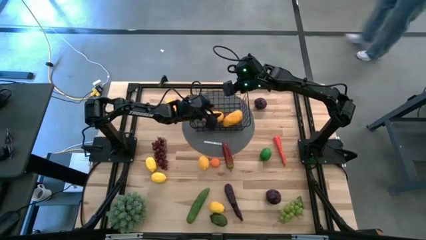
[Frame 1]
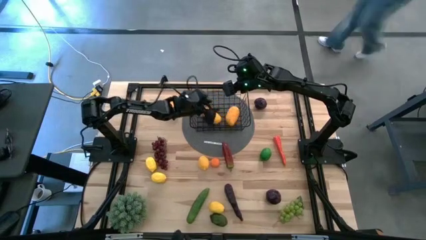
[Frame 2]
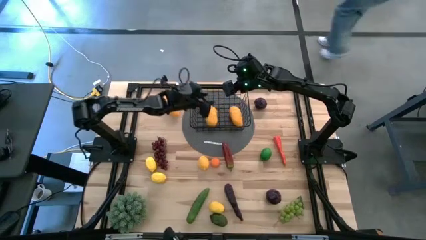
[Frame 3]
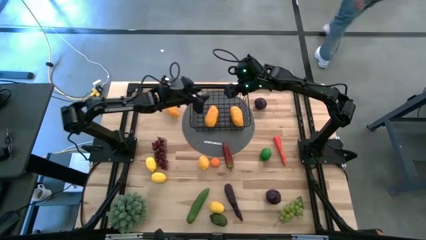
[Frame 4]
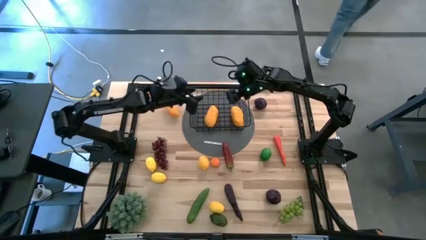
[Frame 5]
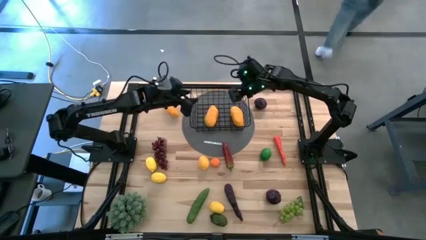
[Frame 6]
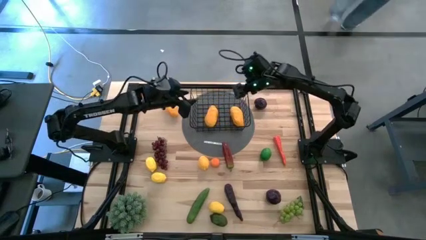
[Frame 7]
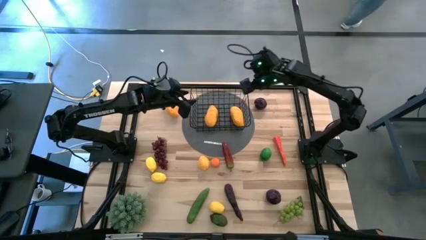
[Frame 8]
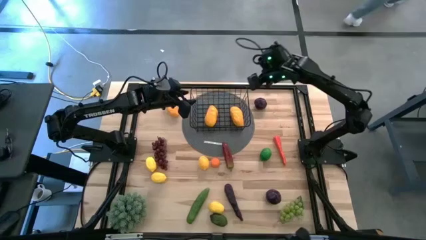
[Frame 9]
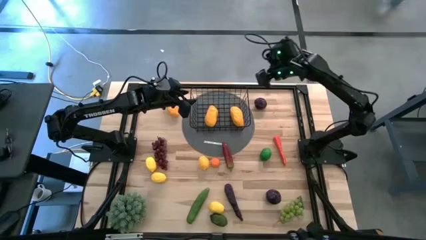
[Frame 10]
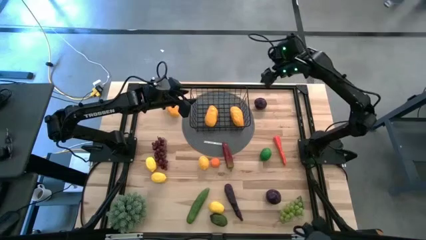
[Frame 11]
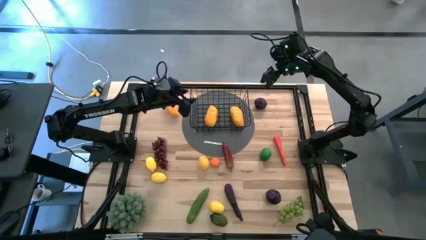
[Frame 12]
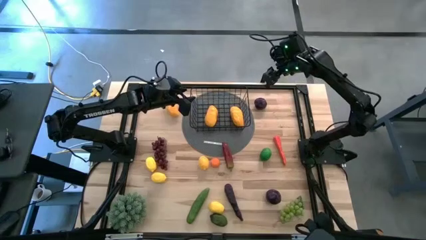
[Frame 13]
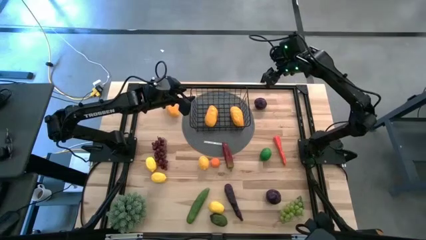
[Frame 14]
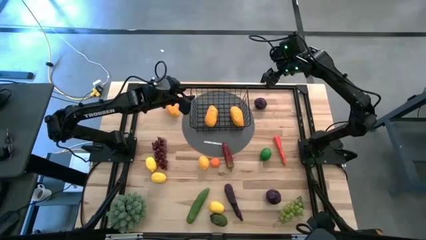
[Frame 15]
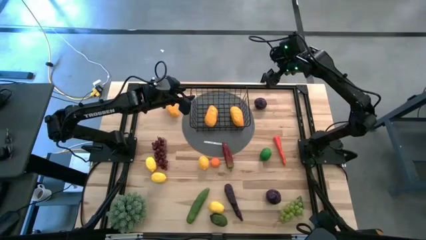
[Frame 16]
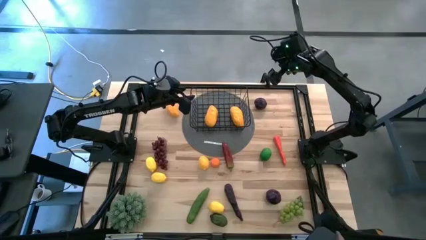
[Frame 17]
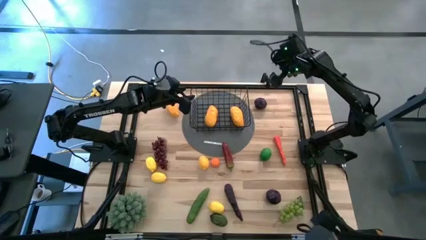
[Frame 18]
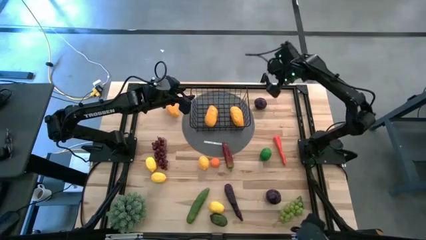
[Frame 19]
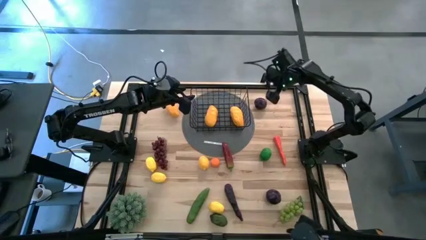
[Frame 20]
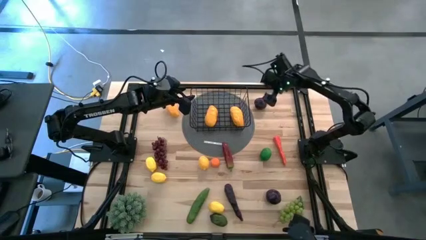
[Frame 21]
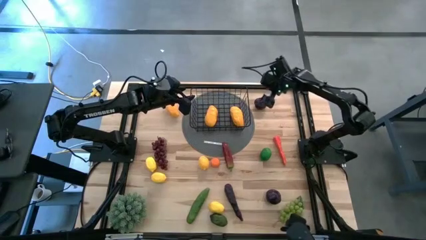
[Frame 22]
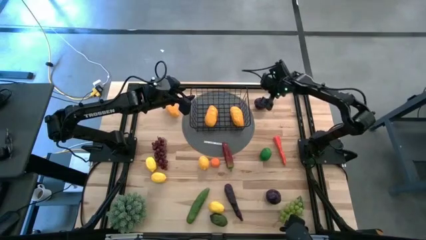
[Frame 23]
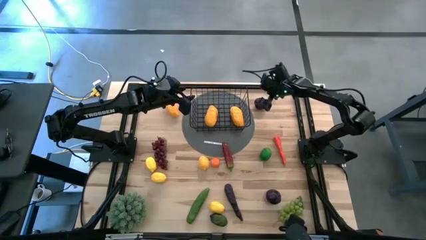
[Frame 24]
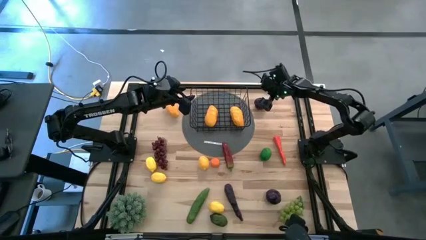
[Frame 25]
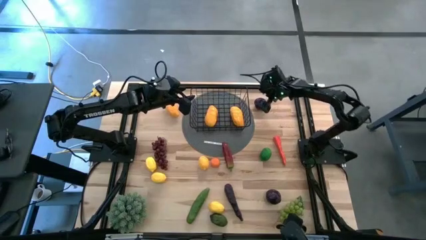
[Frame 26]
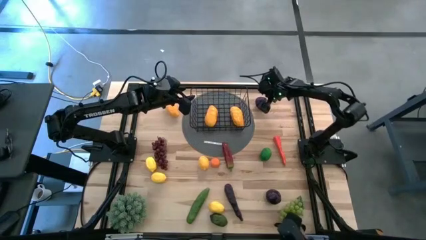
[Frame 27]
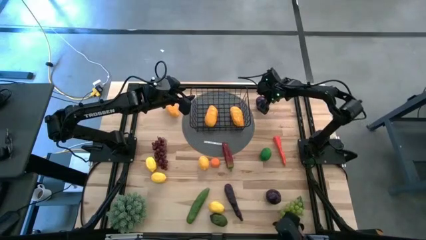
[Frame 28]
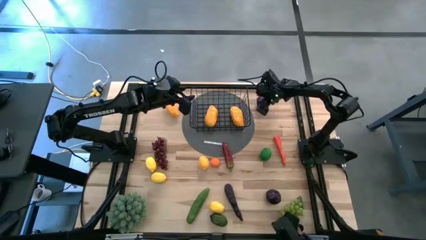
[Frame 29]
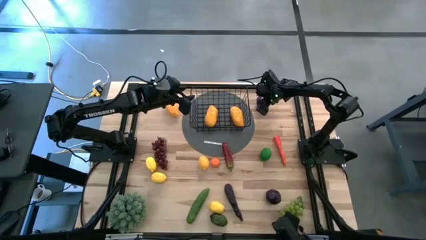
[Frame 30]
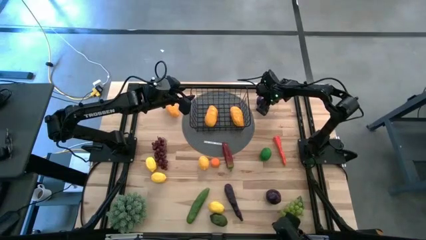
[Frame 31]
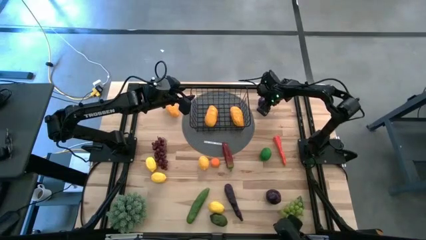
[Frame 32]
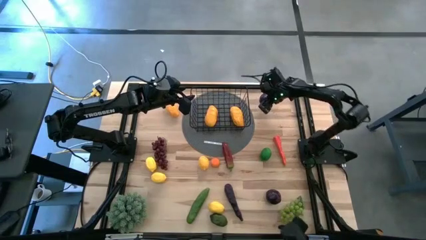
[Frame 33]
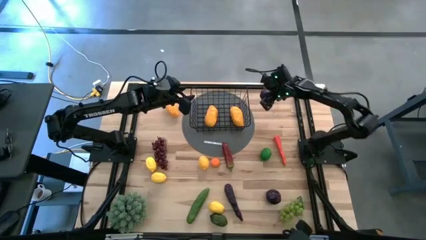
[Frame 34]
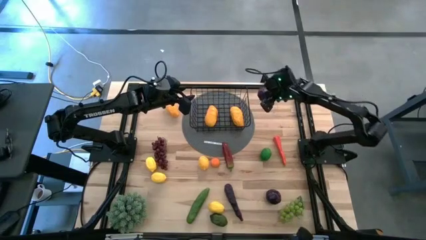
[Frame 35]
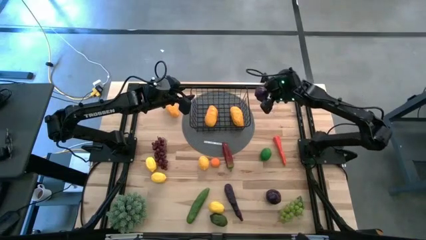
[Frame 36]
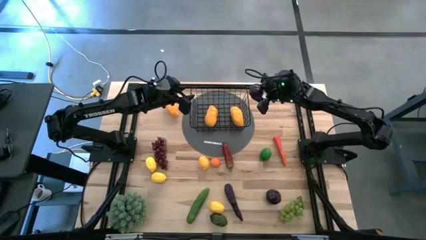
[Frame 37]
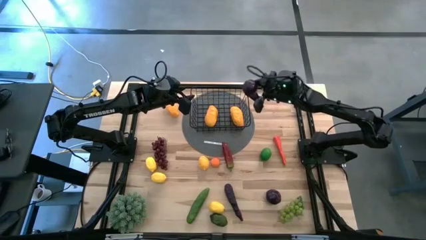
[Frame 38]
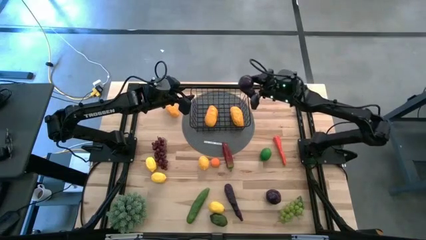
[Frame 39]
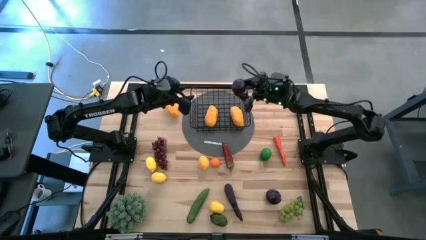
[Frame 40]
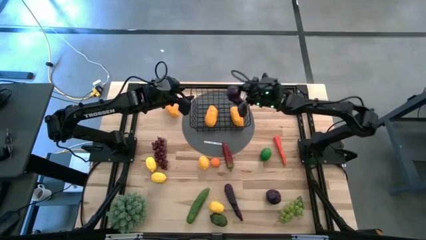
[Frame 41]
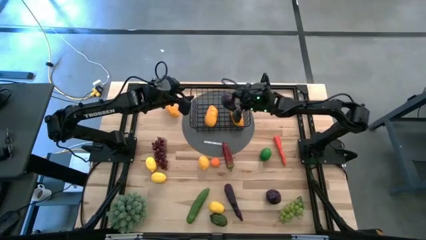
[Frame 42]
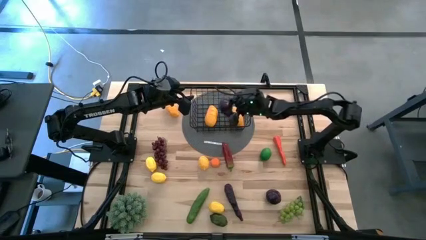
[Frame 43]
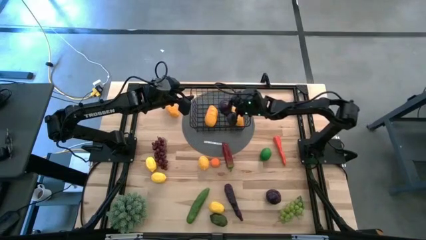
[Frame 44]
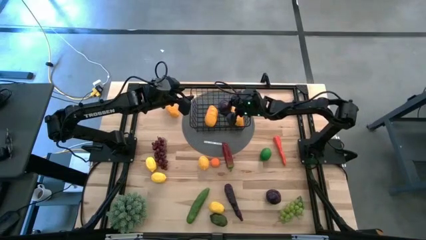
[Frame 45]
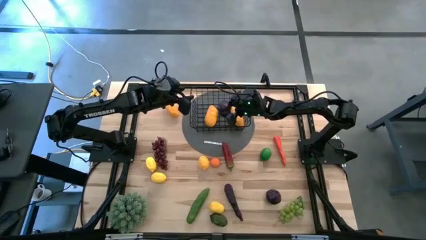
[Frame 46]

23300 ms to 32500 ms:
Task: Build produce basket
Put the top violet plum into the black wire basket

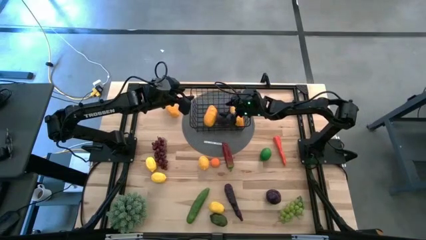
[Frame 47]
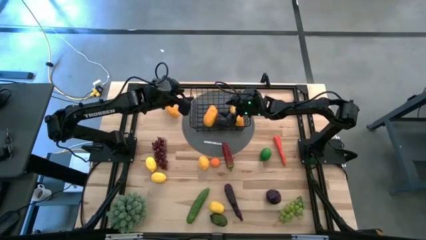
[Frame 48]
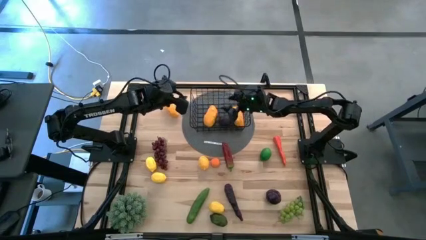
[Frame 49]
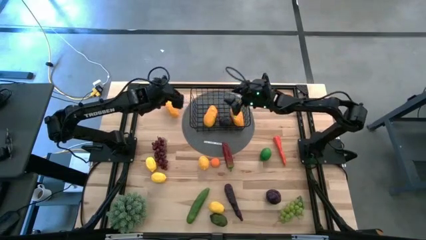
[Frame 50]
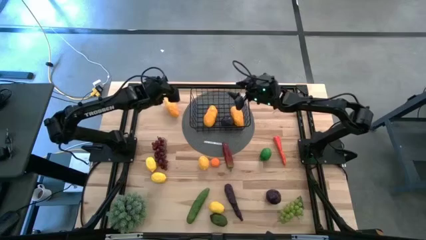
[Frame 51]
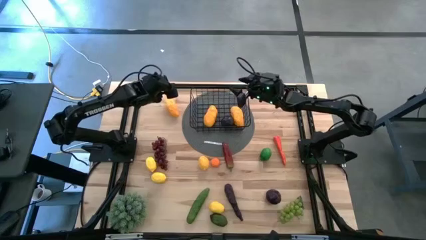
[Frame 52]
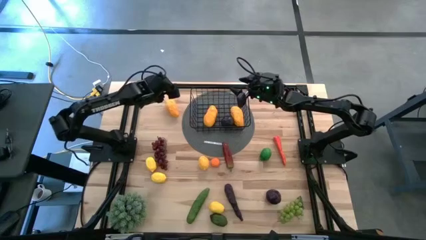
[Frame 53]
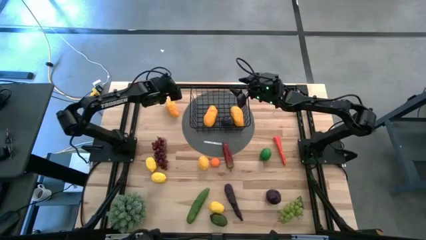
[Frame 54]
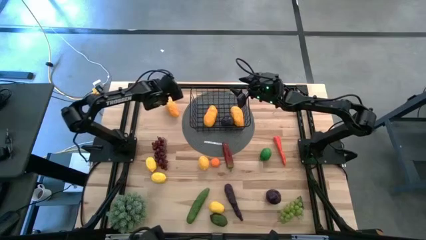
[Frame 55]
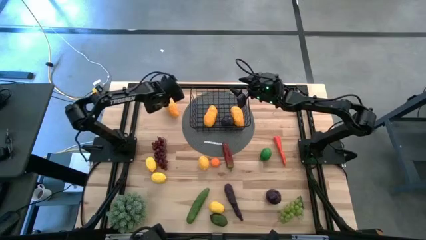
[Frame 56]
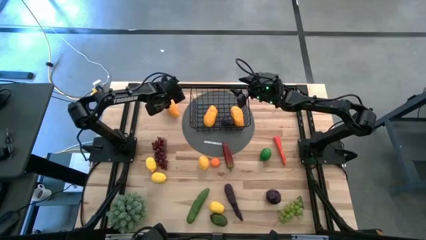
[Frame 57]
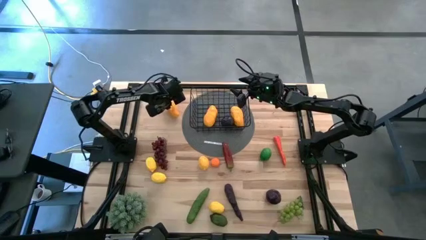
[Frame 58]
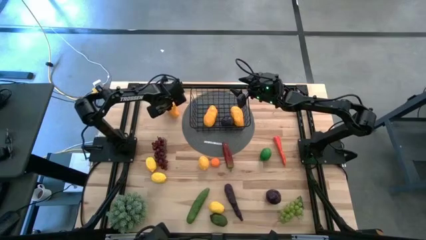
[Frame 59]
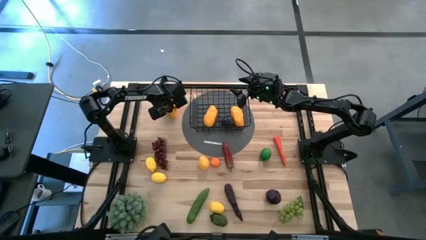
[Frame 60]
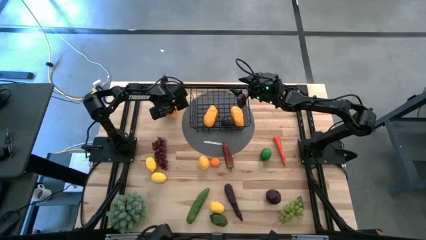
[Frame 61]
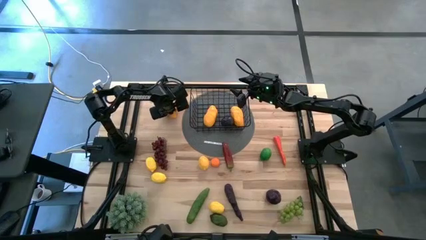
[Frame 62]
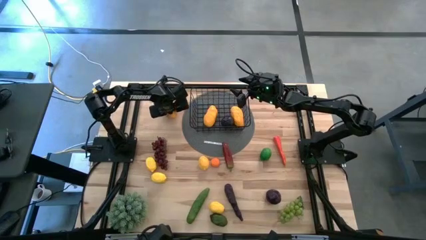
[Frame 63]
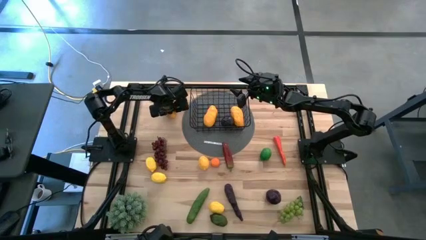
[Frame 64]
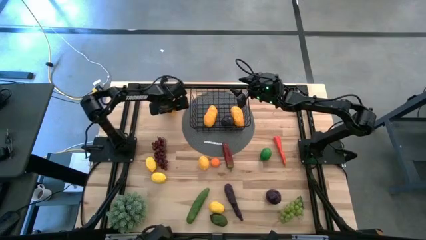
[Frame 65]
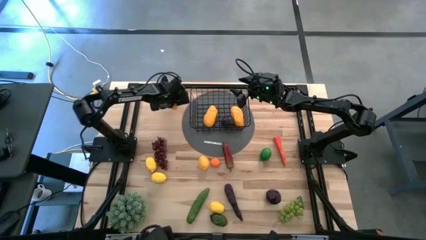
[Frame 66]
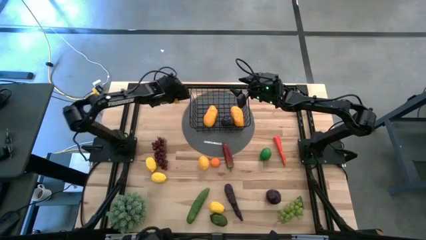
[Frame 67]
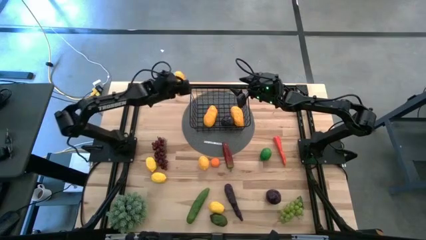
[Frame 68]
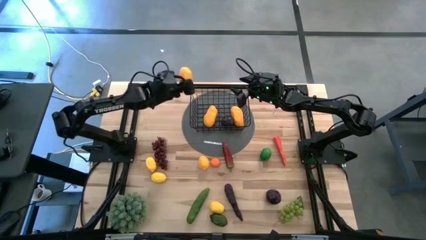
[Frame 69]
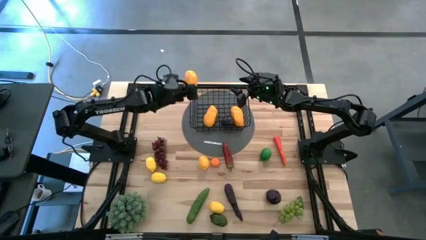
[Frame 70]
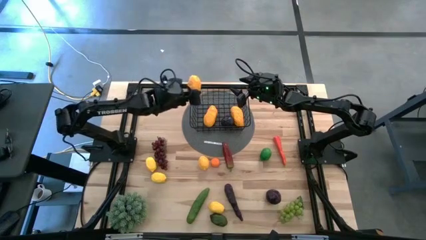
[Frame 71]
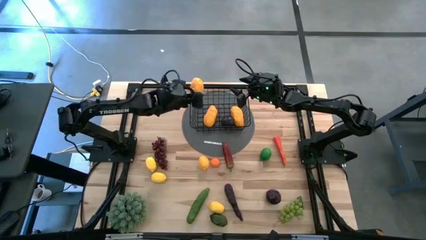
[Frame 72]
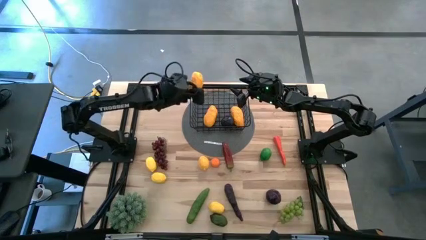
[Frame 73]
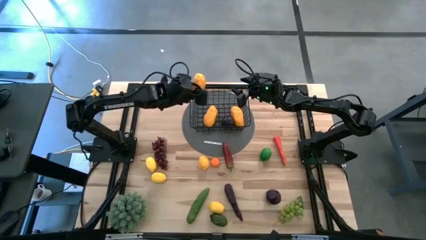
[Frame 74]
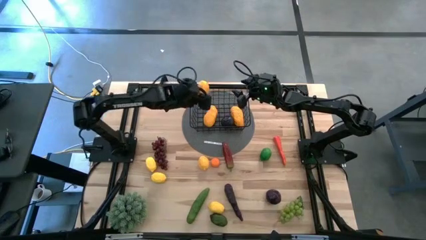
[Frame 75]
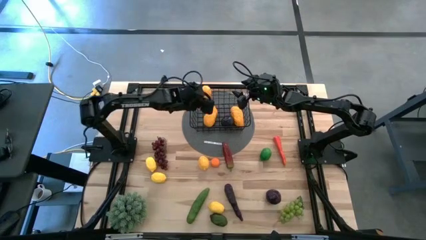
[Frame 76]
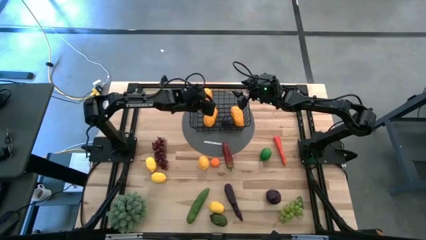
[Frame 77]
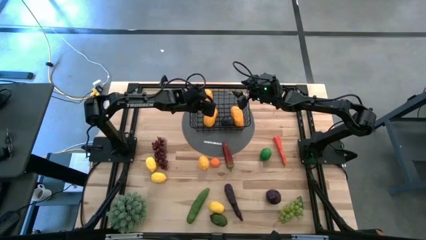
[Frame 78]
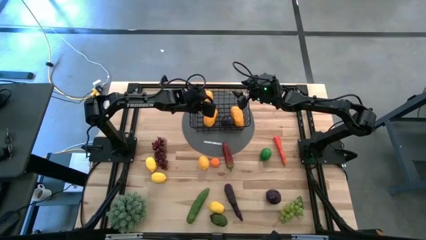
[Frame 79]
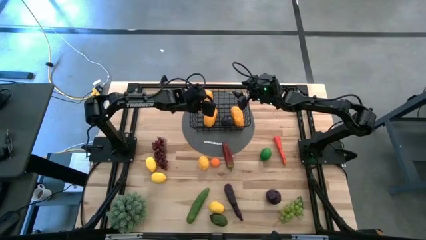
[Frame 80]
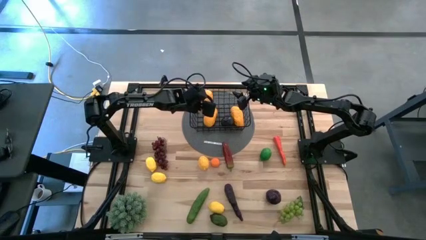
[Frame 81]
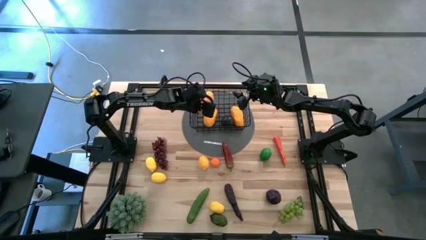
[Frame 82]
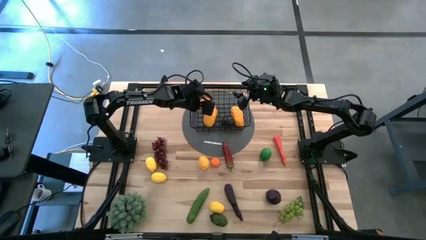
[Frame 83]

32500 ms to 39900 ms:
Put the yellow mango into the black wire basket
